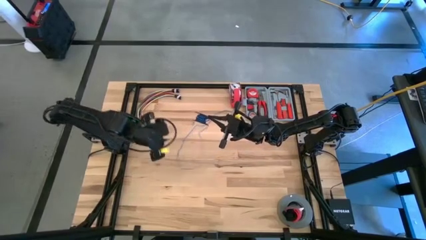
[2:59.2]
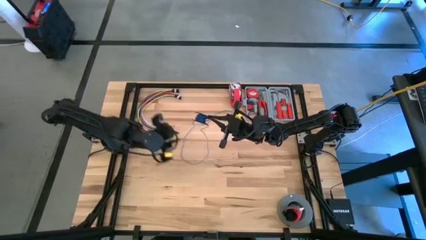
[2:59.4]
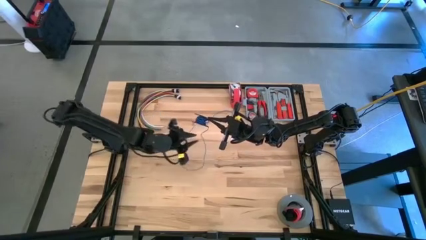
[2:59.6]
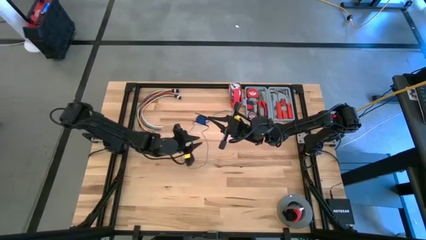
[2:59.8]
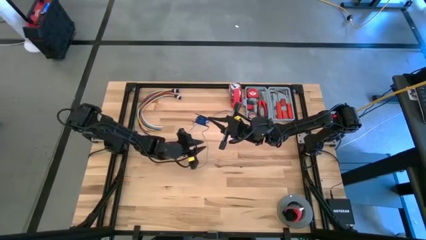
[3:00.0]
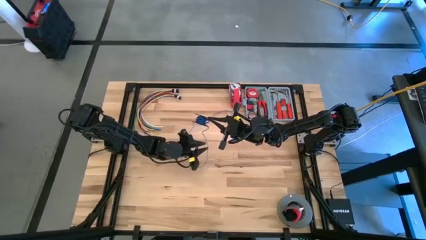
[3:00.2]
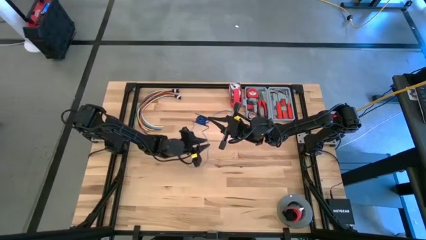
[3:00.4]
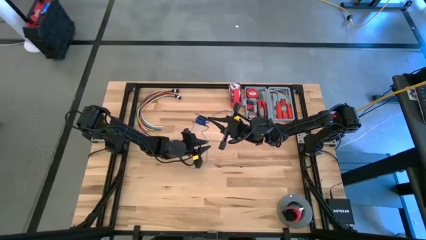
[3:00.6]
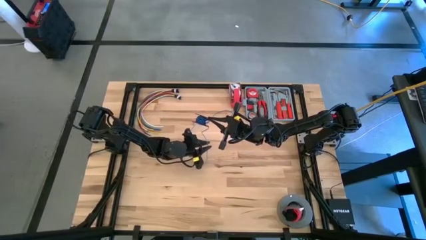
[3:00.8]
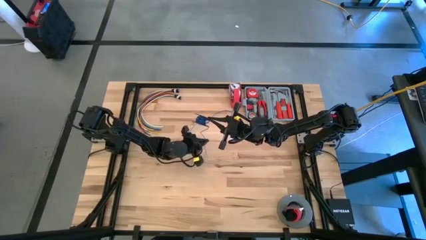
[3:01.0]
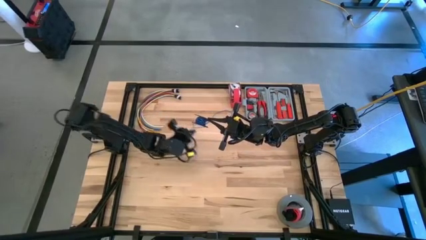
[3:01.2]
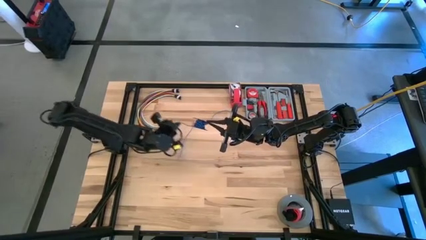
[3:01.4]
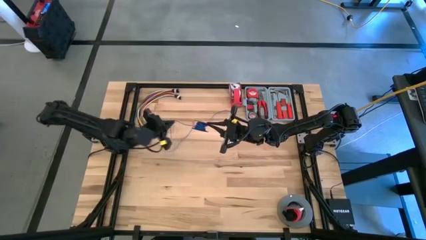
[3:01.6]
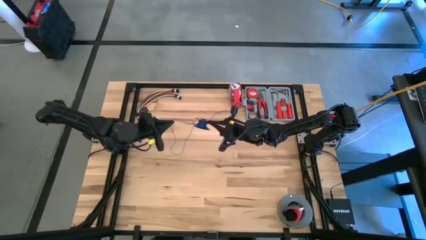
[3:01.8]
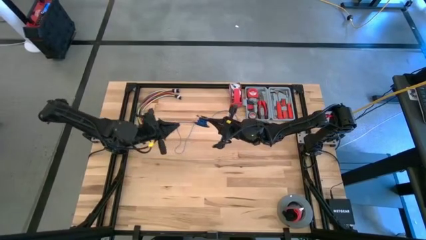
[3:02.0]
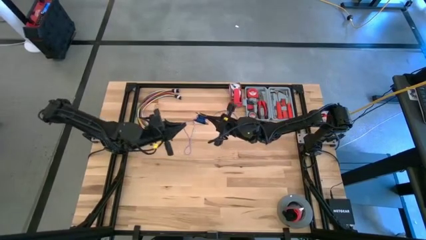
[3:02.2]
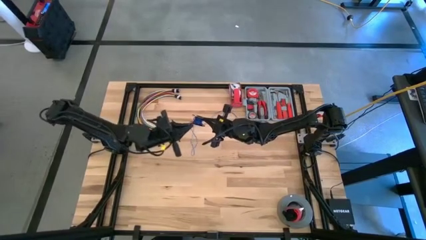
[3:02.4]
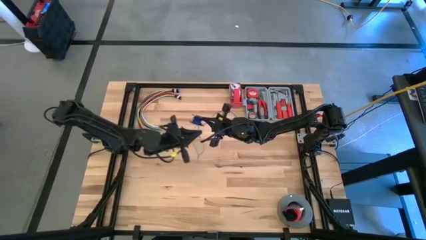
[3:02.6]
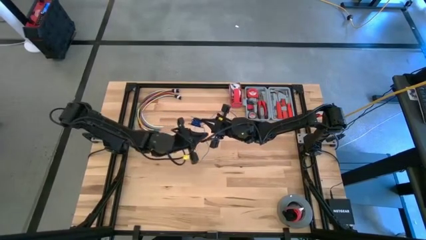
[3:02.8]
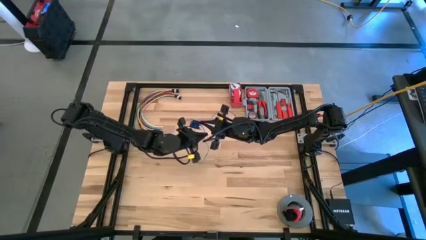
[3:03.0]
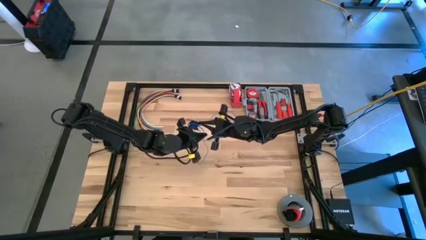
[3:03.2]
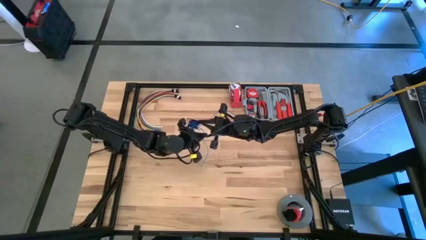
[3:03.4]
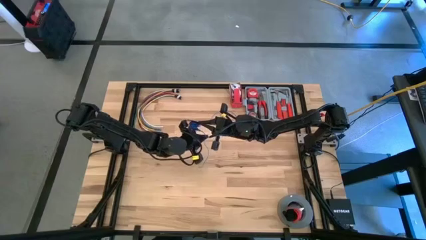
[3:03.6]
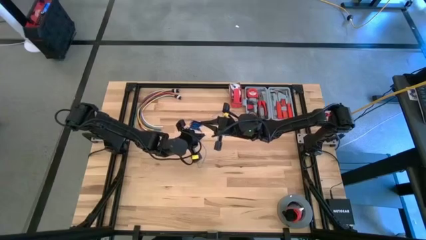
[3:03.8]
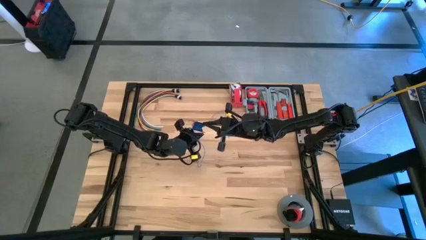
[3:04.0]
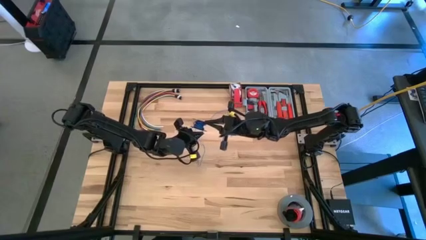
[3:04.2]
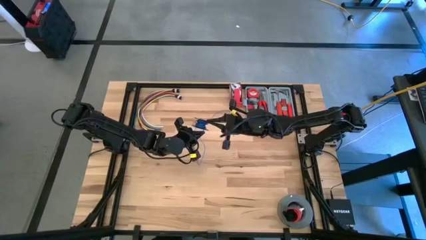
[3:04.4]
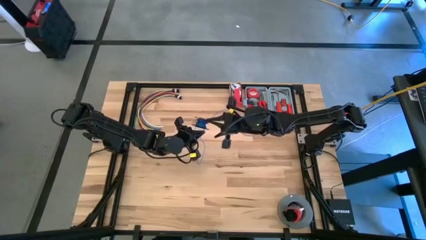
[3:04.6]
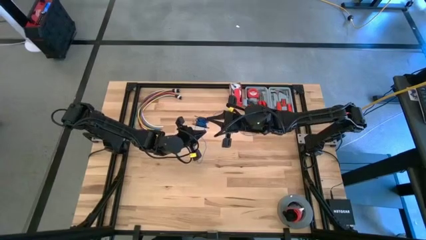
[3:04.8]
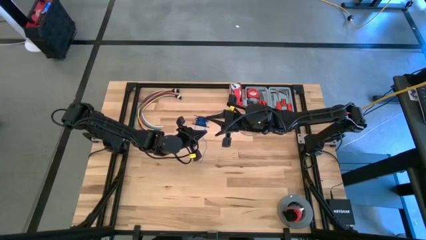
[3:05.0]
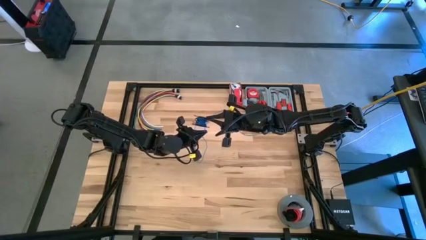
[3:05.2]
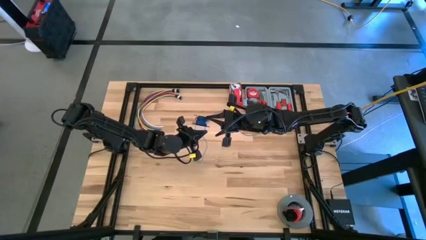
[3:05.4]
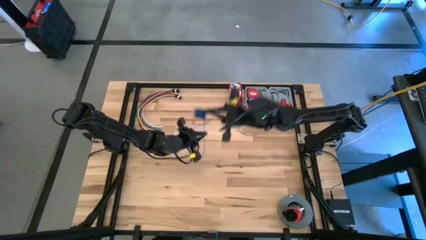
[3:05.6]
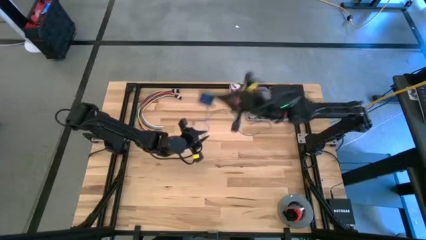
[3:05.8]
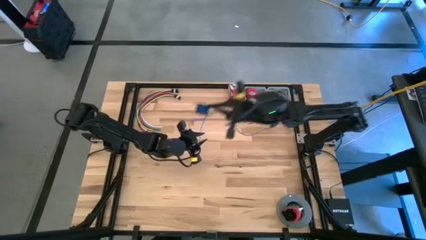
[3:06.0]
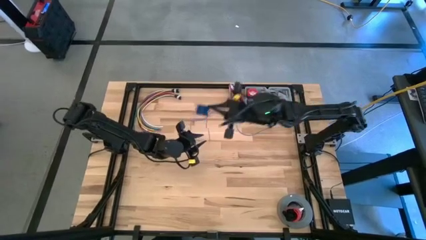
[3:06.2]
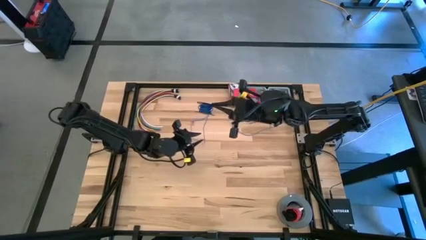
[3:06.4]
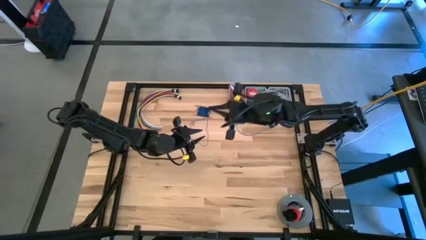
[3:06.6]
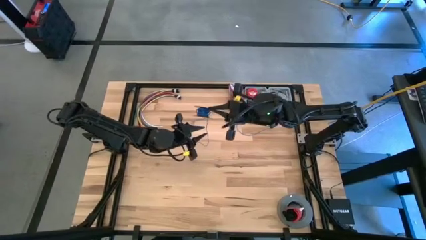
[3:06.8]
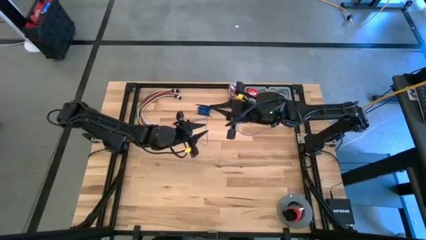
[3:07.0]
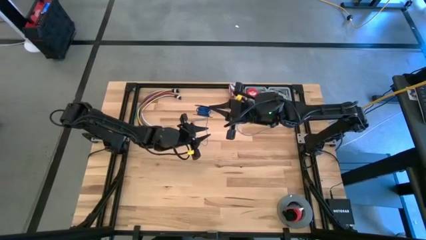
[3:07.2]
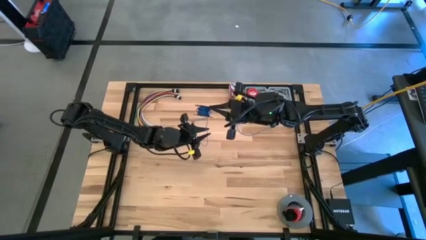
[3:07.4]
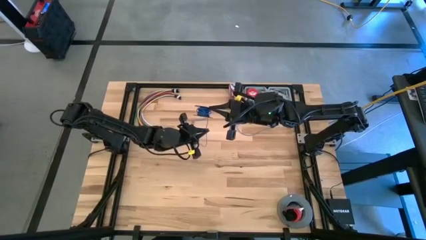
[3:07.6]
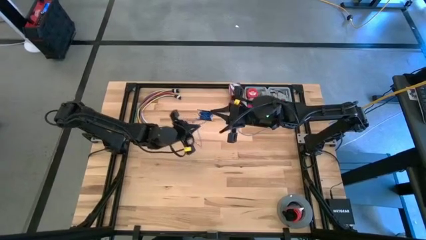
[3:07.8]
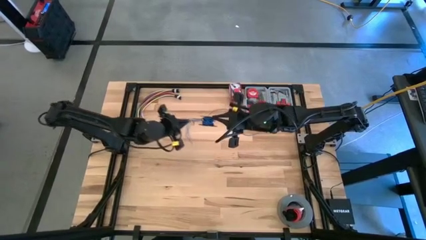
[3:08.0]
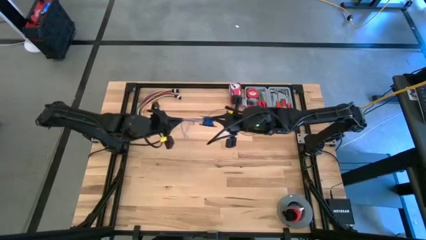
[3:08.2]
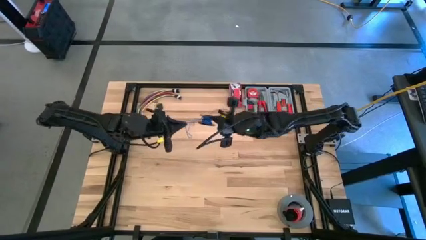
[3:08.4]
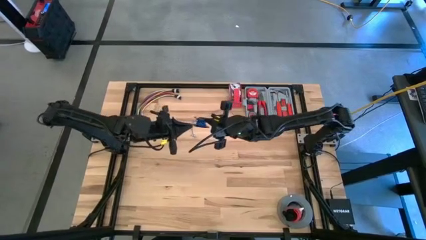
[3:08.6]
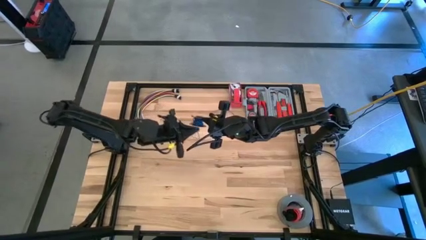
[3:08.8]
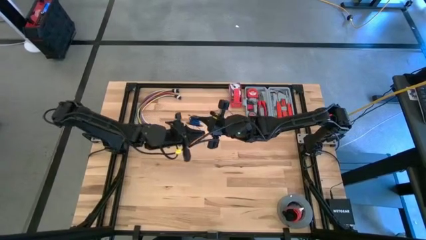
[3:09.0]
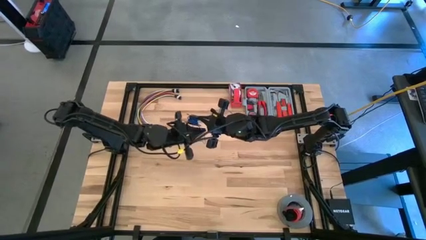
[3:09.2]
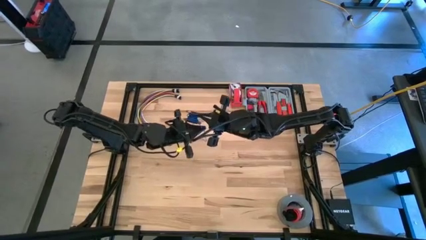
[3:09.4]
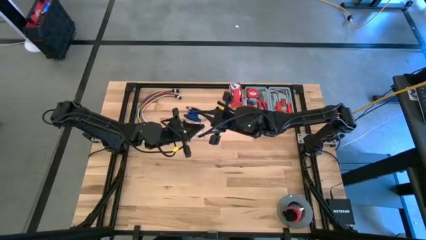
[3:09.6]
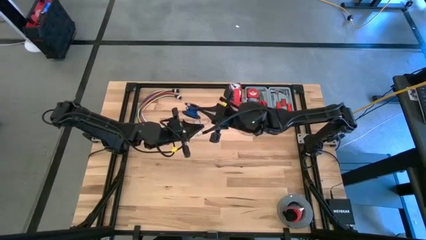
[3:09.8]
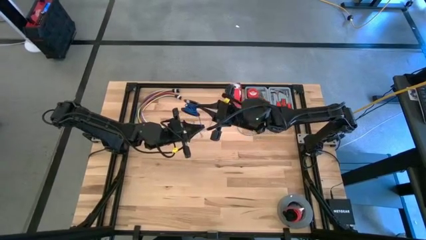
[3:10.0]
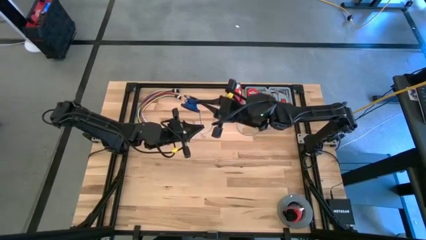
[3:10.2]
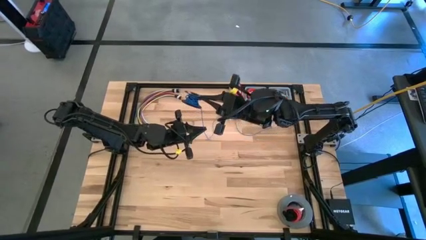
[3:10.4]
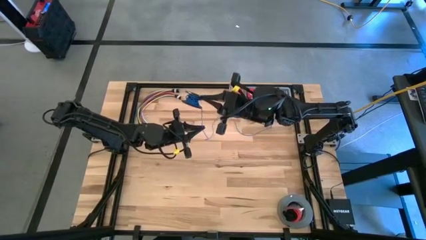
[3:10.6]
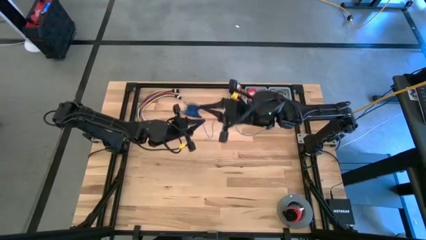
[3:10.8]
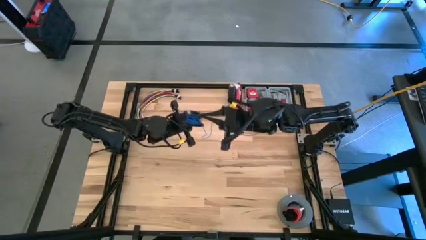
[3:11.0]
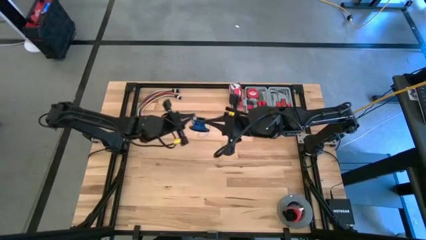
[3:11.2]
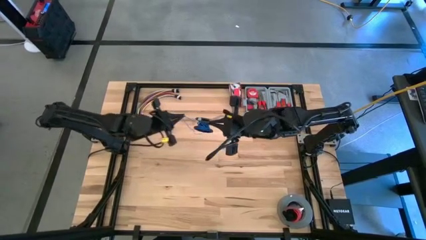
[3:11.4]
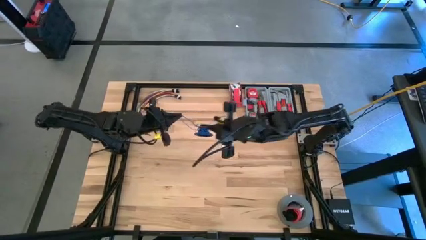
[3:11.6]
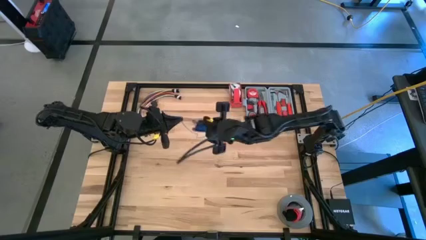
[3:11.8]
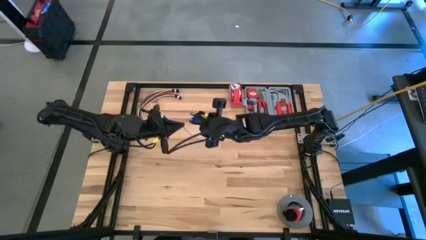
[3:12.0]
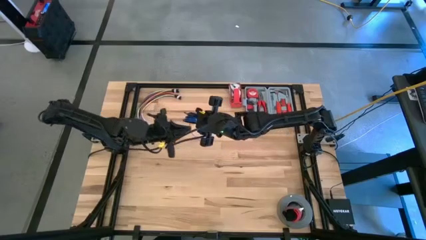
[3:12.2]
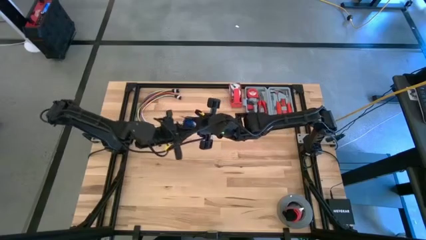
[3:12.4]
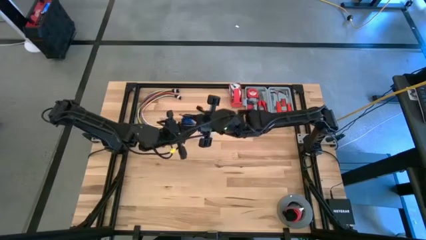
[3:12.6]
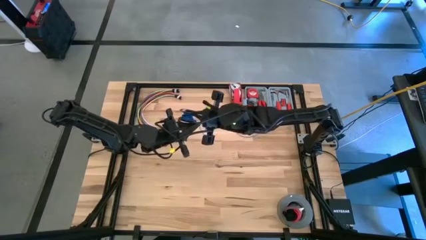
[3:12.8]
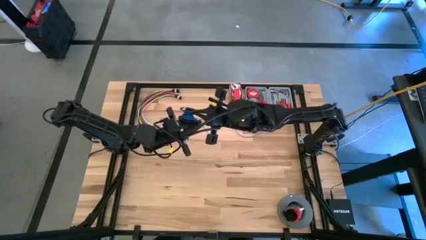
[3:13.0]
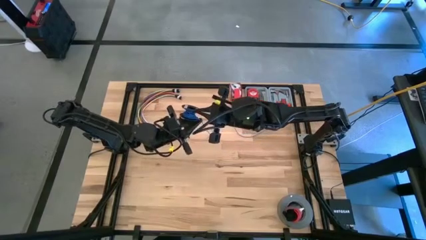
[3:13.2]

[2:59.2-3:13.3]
Task: Coil cords
Coil the blue wire on the black spool

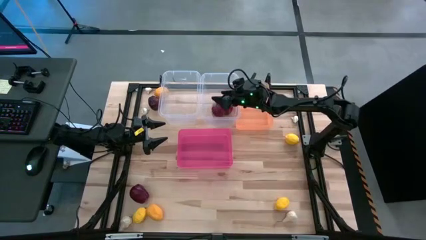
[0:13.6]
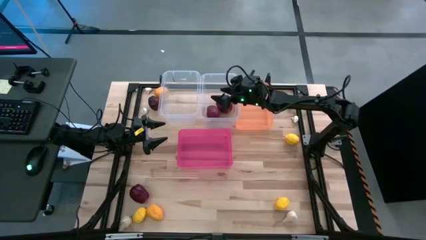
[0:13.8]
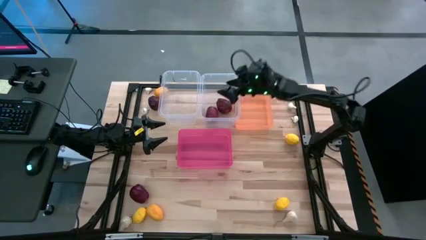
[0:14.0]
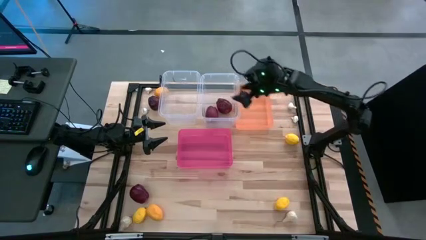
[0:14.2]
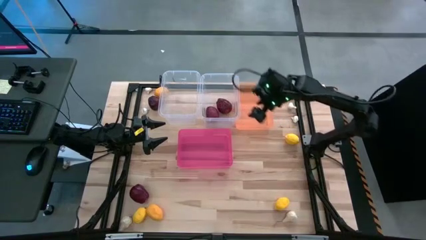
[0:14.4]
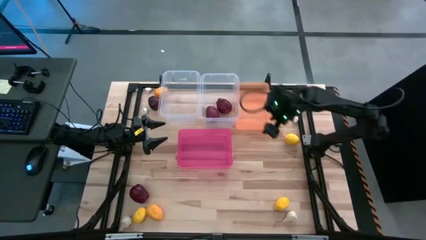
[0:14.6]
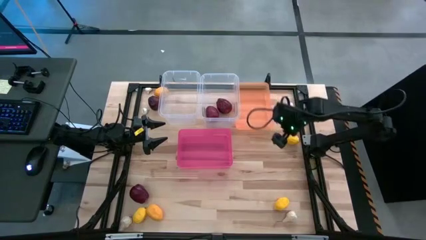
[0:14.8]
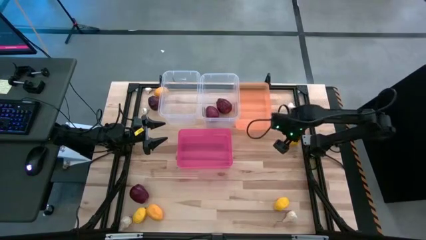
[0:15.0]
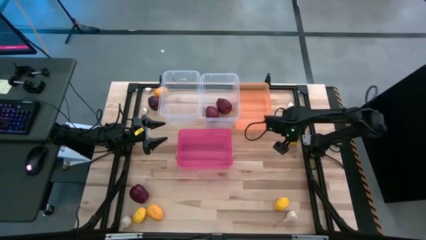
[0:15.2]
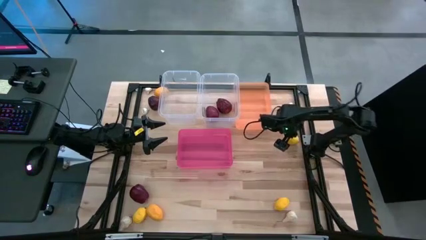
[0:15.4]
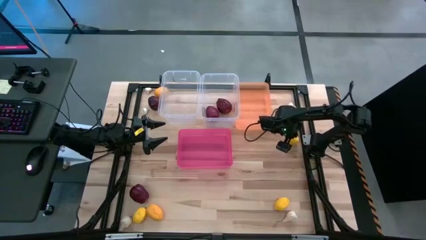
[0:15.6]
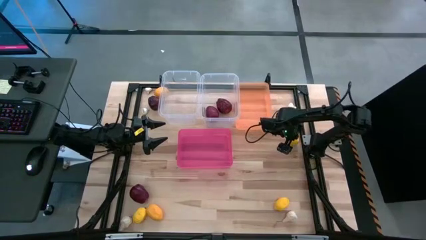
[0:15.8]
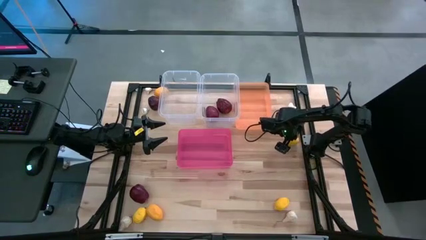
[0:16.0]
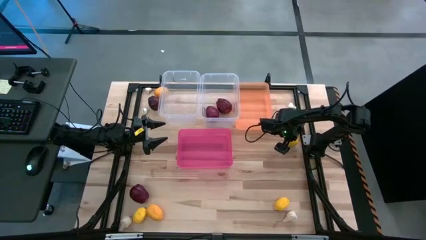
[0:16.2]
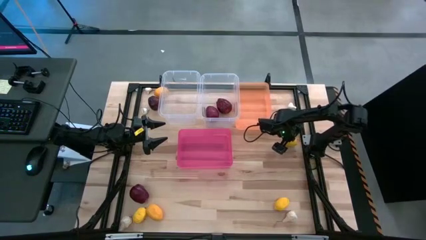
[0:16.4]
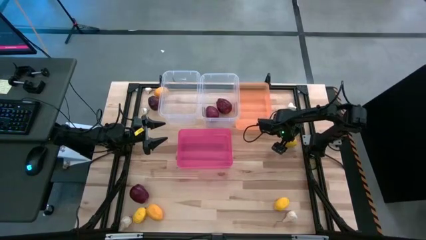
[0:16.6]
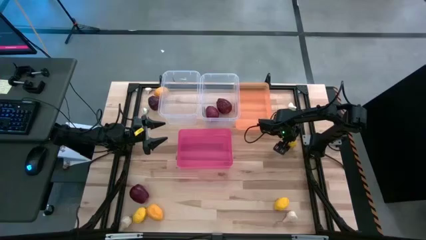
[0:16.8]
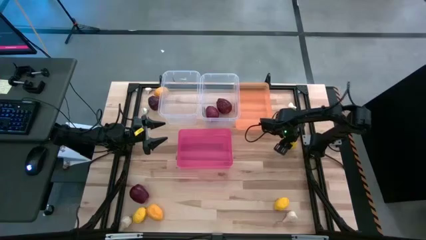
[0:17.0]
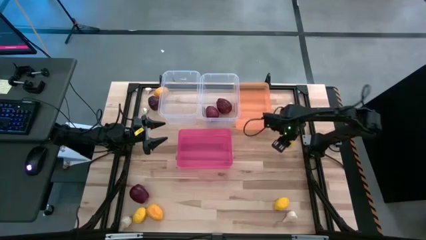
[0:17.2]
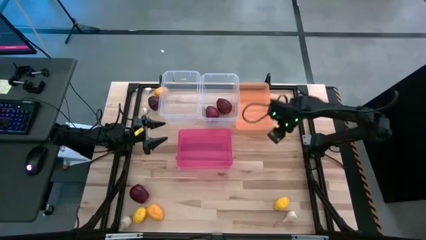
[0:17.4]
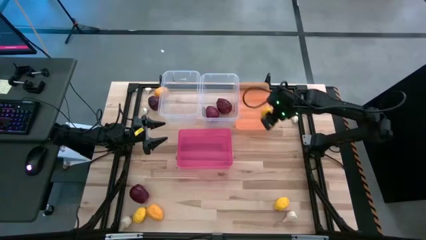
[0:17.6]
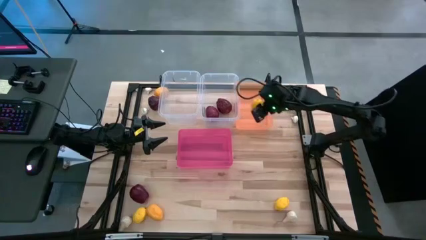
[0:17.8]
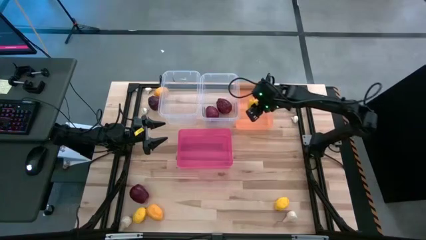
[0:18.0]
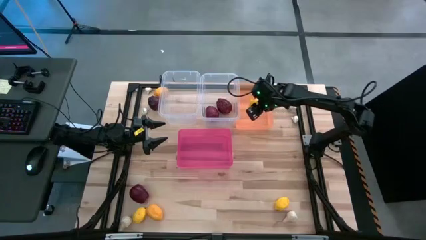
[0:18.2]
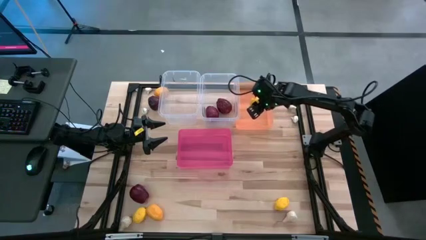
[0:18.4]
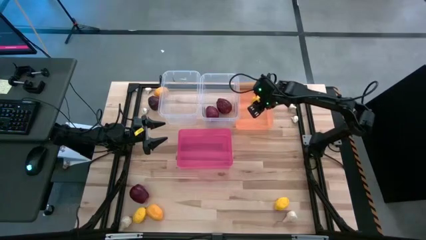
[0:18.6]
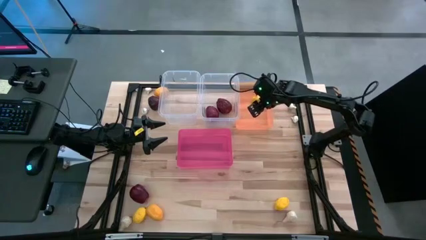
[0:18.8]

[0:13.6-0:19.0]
Task: Sort produce into baskets
Put the yellow lemon into the orange bin
